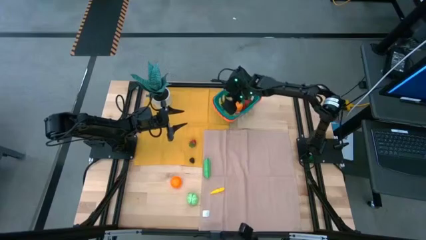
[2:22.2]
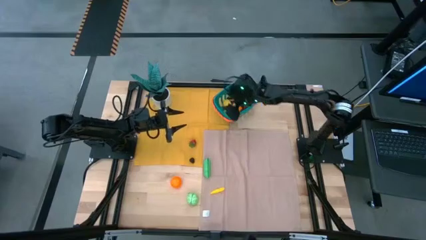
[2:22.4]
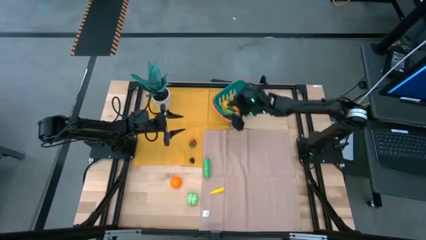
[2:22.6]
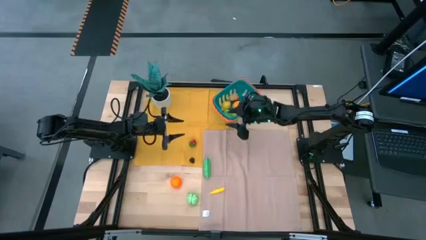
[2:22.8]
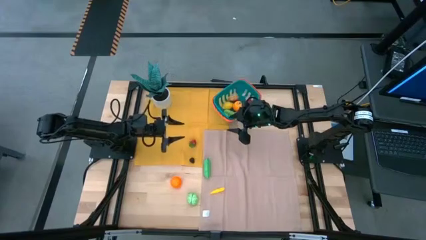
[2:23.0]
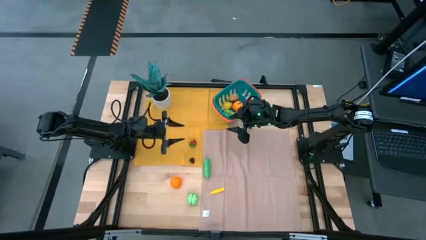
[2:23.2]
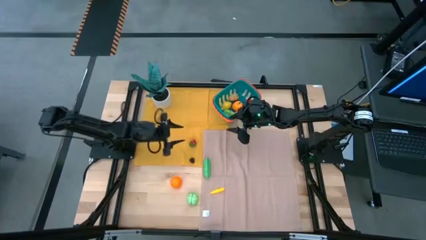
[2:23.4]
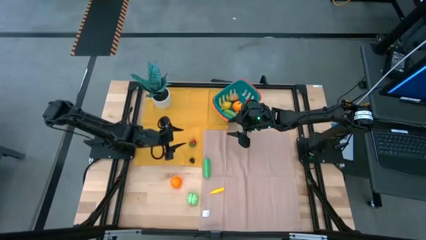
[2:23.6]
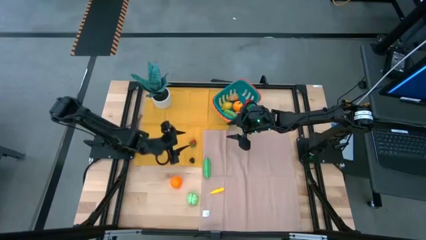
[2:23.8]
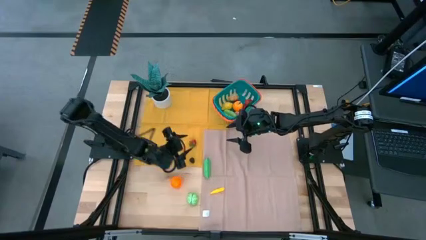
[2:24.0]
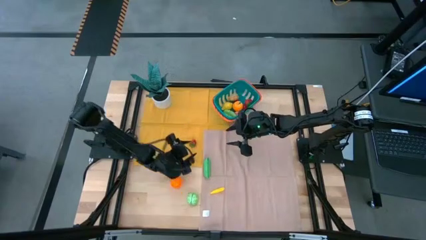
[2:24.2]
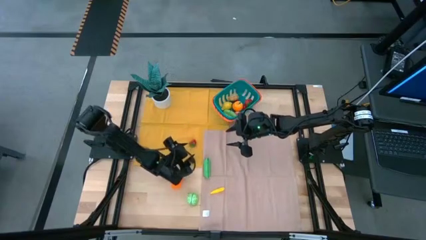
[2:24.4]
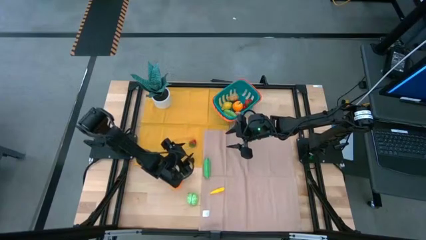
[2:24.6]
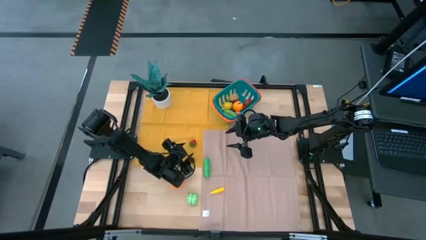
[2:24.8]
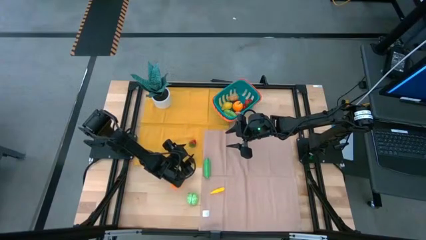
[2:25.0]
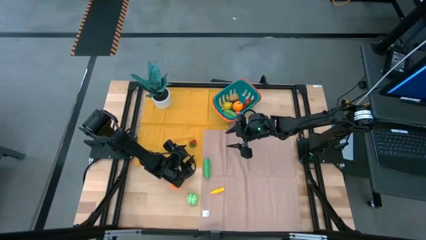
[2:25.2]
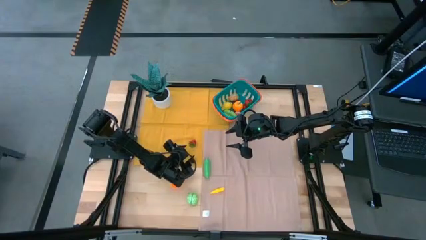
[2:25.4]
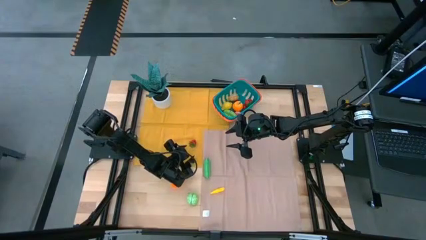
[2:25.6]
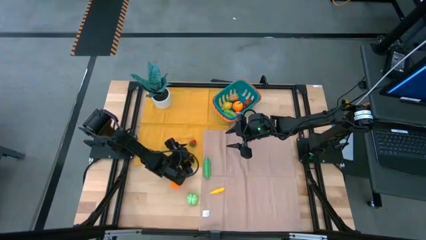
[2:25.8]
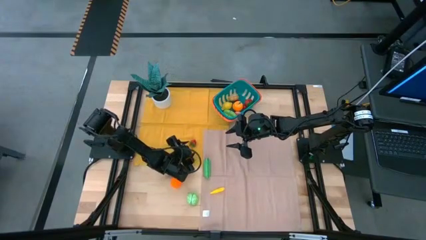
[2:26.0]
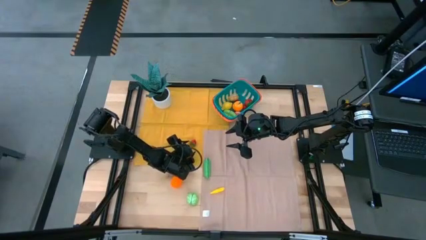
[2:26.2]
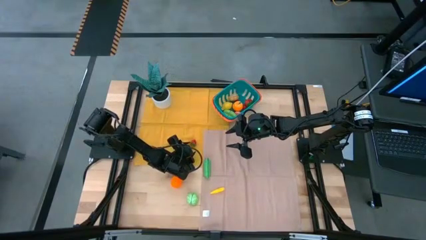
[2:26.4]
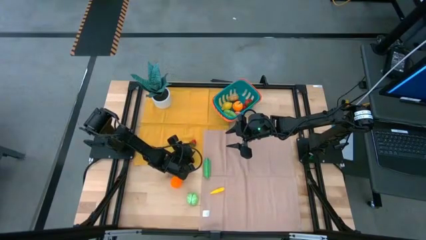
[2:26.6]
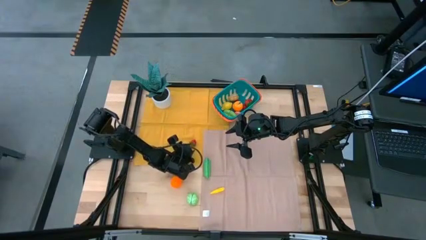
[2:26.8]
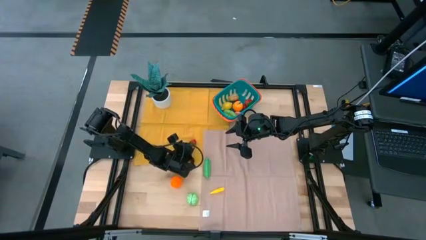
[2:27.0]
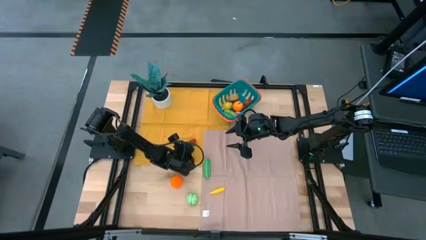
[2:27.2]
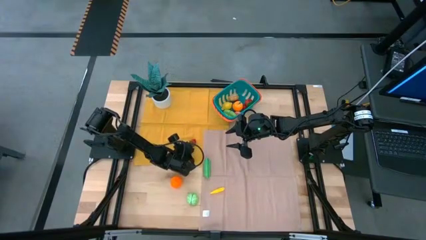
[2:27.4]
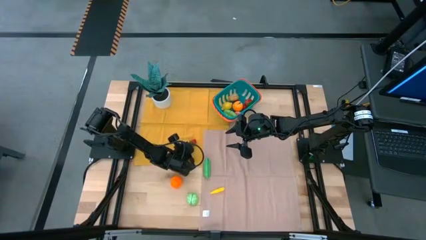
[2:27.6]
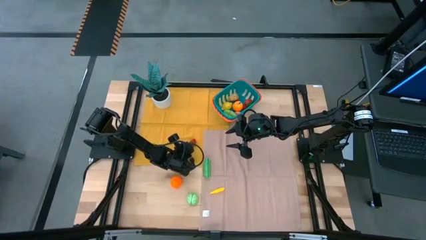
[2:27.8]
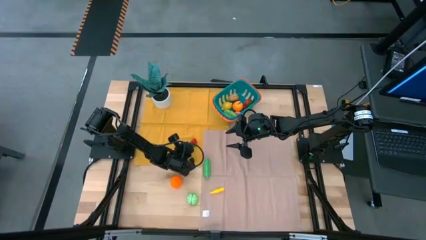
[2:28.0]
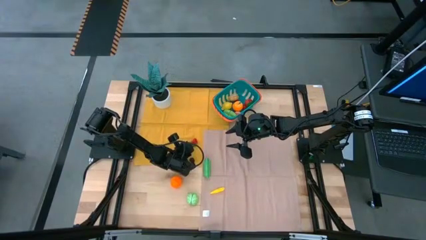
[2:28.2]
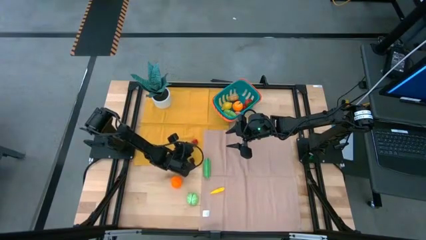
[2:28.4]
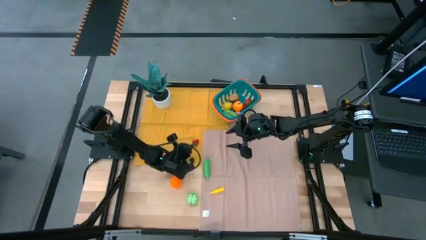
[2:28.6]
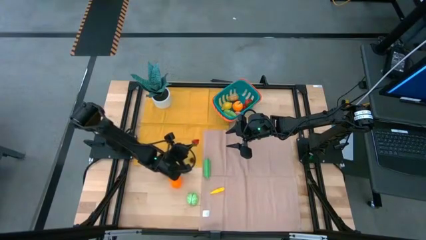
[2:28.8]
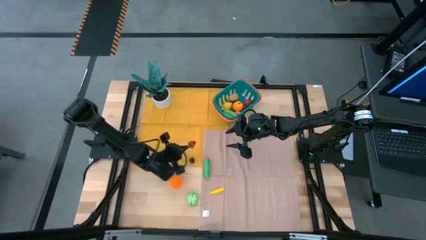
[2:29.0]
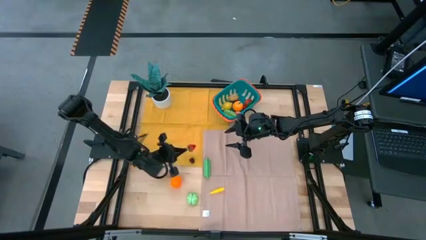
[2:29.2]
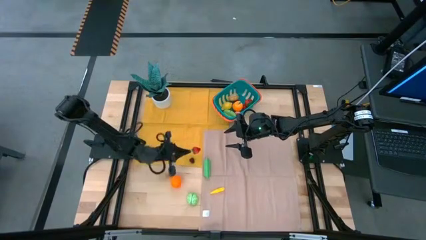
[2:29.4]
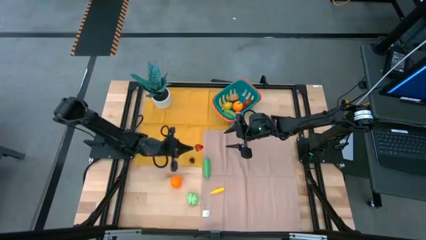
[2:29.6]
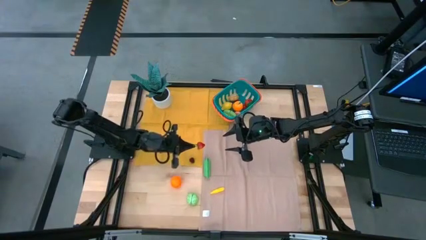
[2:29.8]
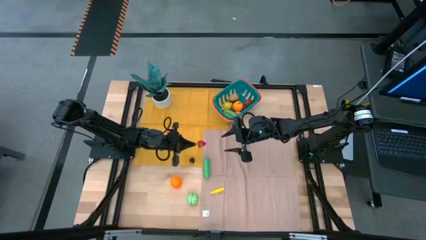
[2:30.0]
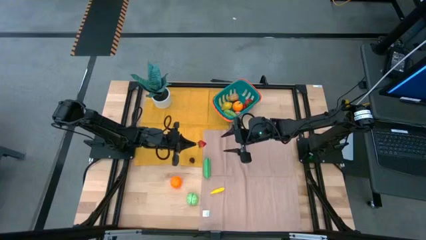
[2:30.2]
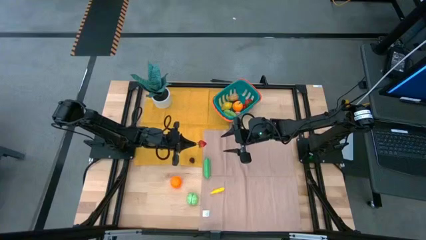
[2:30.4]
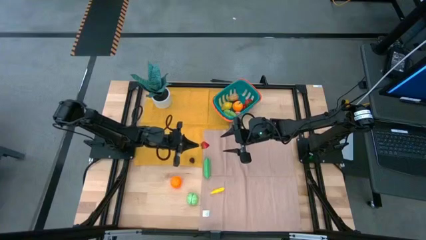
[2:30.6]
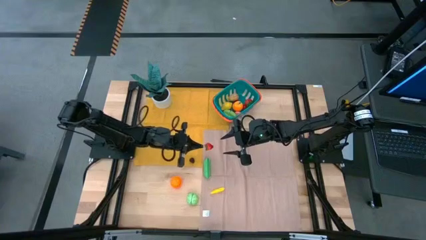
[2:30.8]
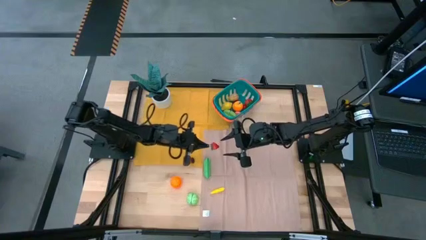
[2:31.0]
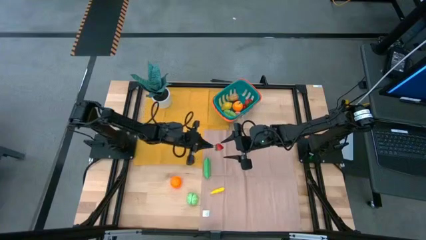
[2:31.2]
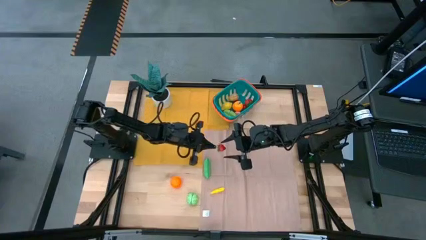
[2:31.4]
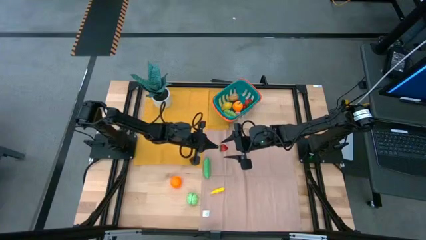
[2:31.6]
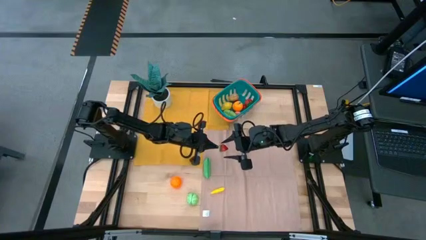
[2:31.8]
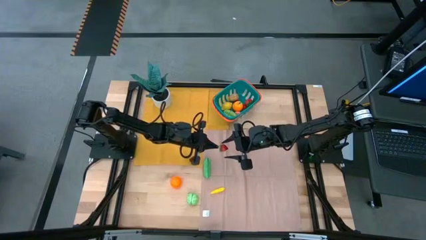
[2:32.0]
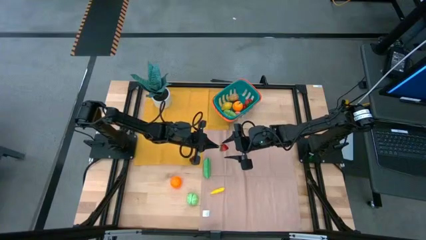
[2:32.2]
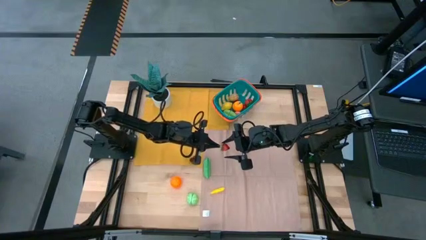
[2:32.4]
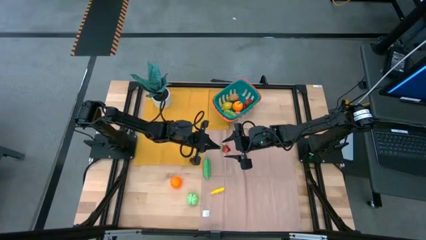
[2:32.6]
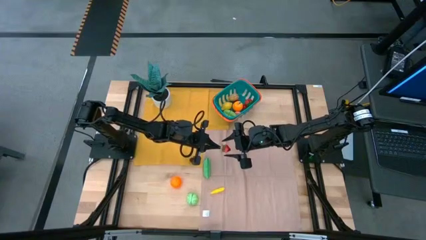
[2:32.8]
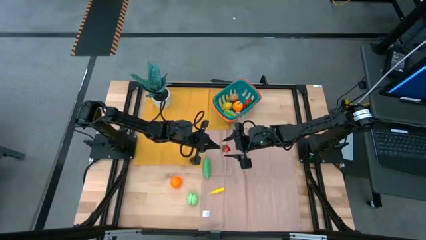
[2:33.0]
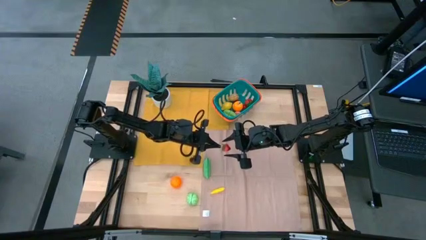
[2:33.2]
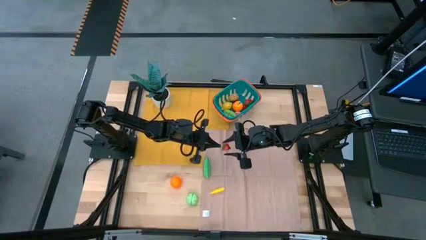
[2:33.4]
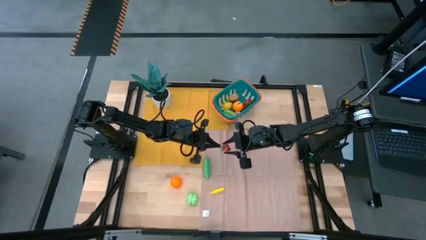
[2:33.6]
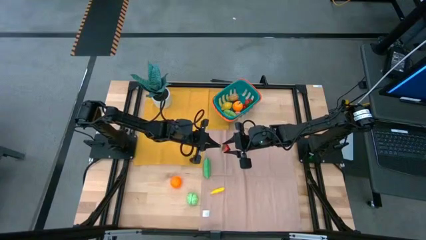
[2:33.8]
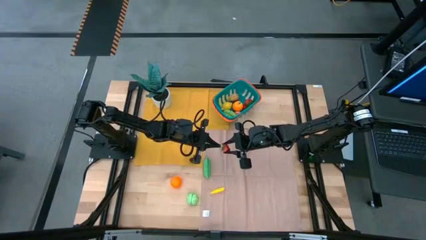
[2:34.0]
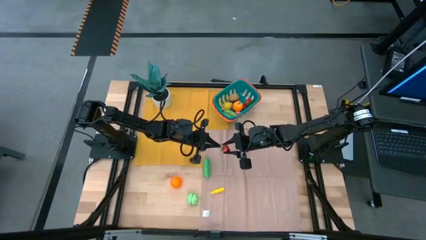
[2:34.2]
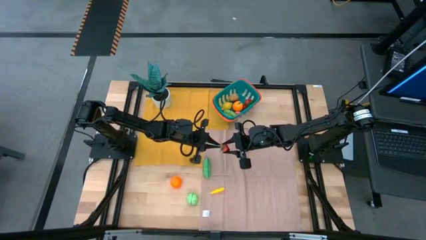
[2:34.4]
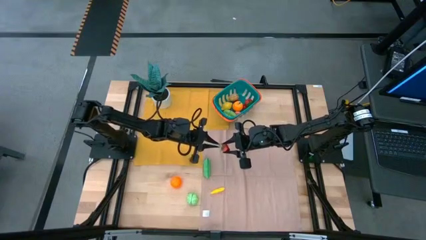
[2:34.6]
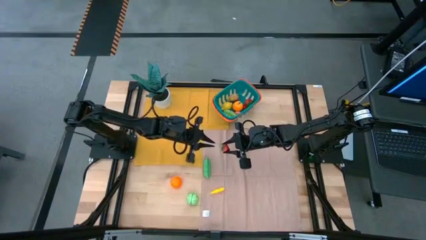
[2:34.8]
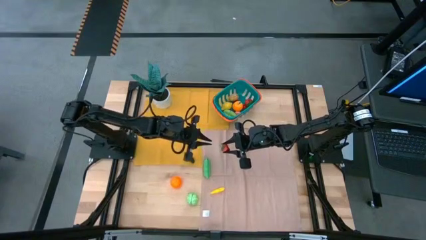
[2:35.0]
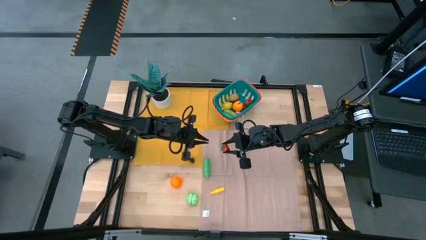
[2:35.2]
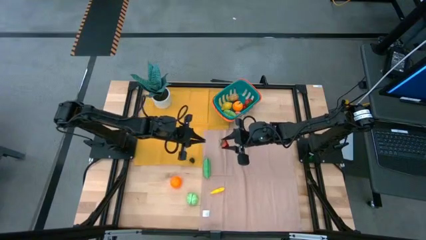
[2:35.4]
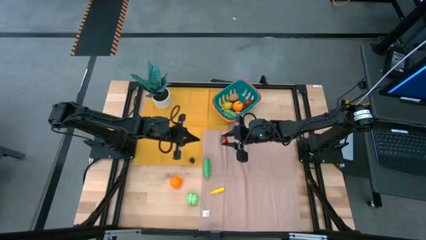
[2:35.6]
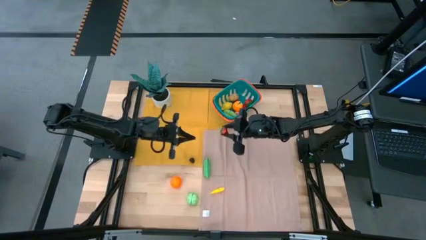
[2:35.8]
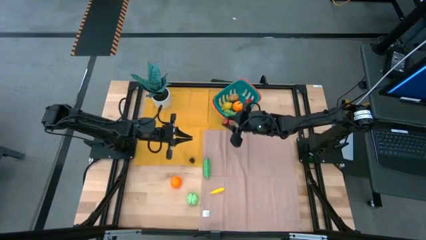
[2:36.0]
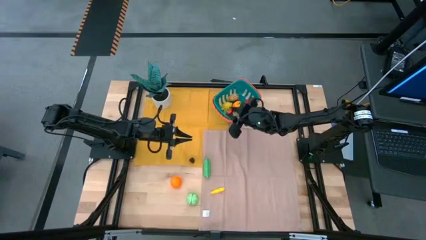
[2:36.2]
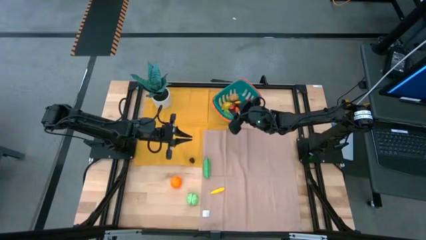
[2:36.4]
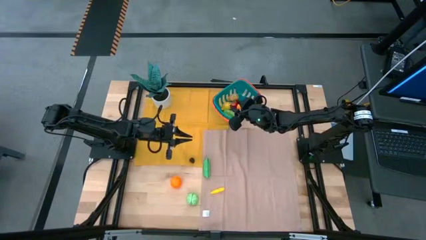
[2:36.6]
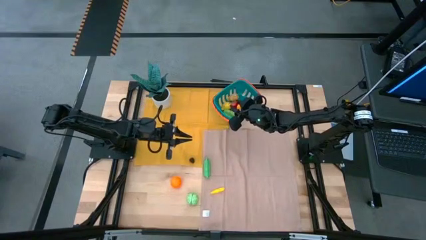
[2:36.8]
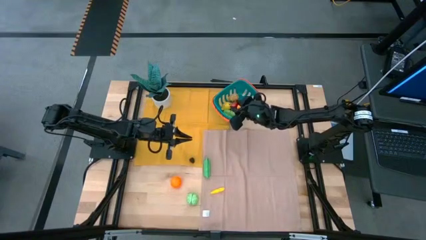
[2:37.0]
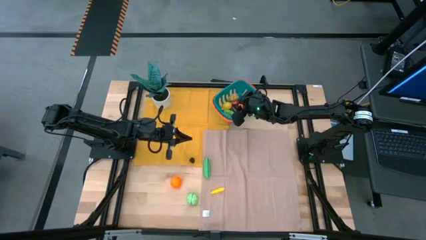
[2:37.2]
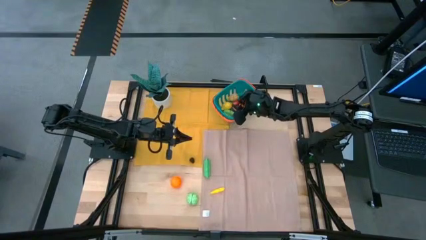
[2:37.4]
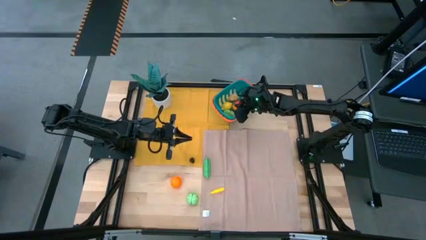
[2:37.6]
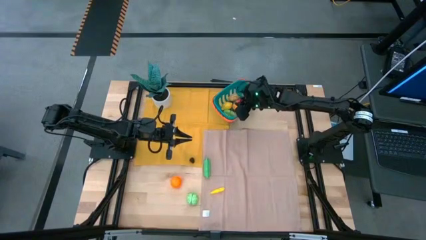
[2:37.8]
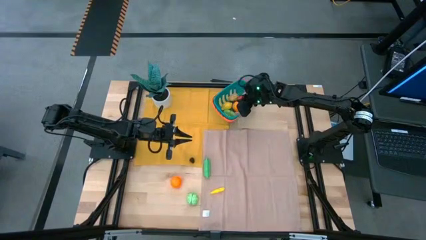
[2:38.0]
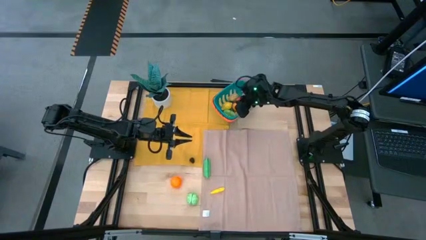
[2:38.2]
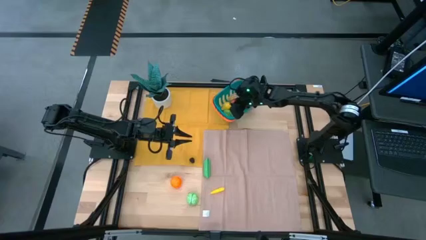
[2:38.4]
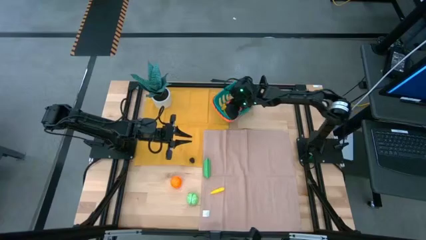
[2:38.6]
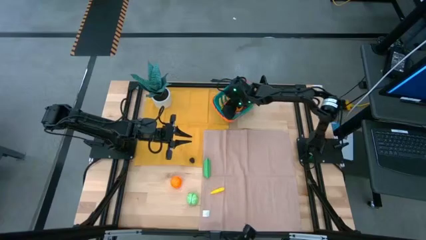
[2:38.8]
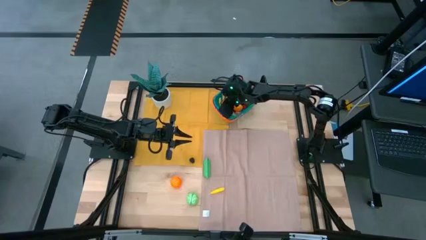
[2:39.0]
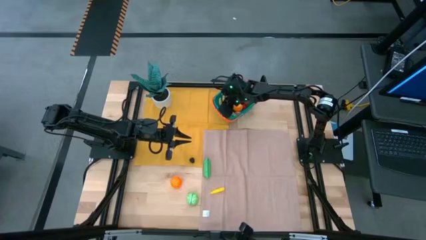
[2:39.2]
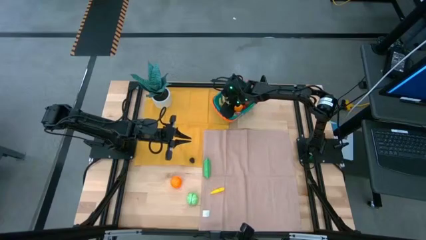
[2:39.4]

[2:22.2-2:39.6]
Task: Pick and placing Produce into tupperware
Put the strawberry into the basket
